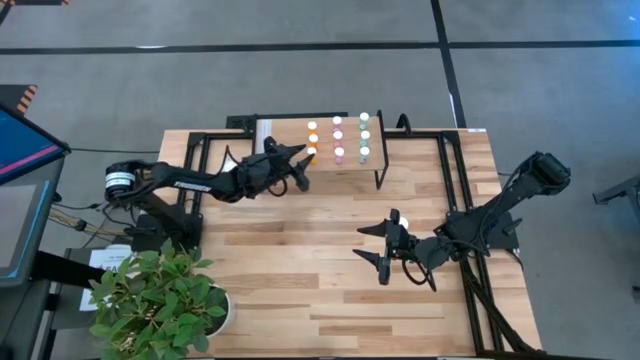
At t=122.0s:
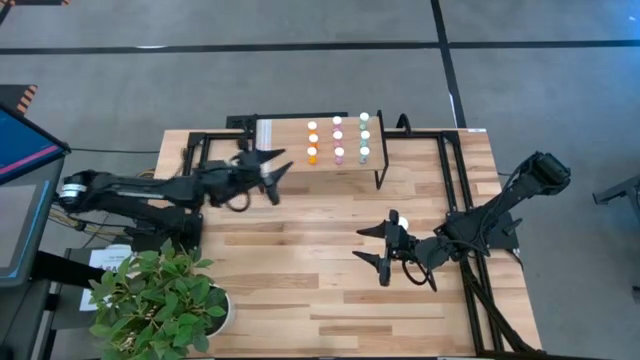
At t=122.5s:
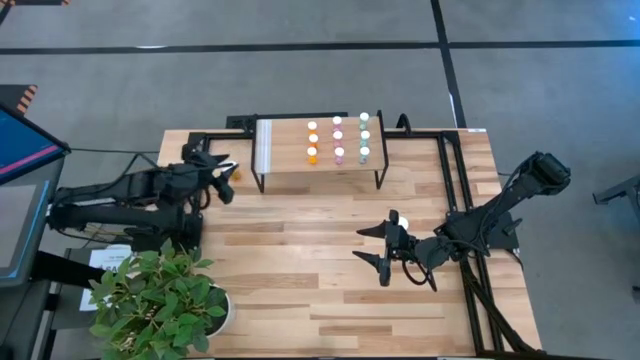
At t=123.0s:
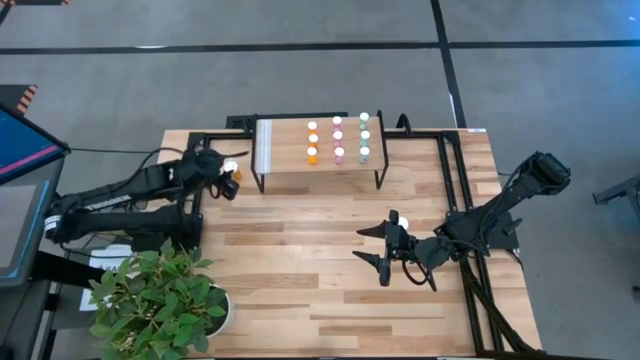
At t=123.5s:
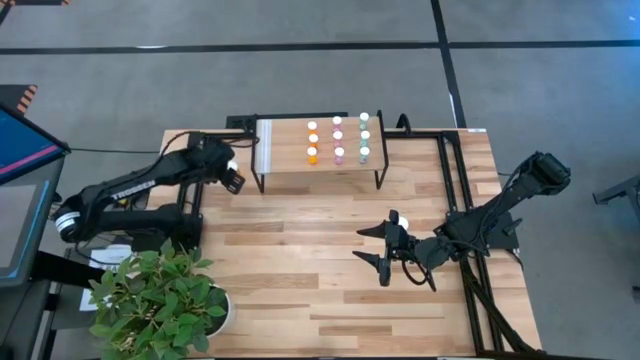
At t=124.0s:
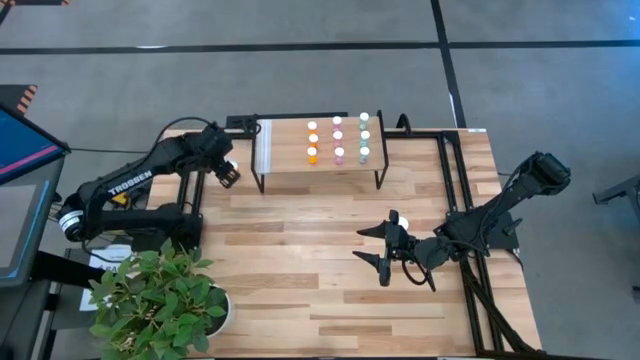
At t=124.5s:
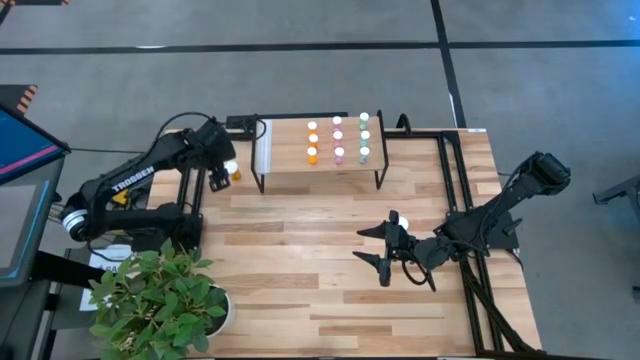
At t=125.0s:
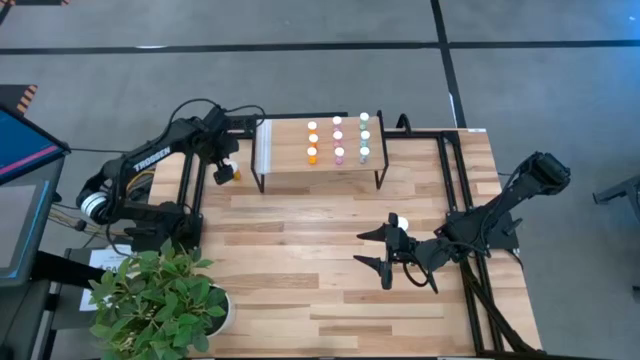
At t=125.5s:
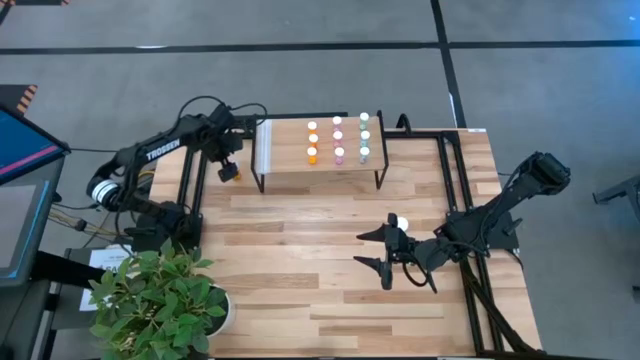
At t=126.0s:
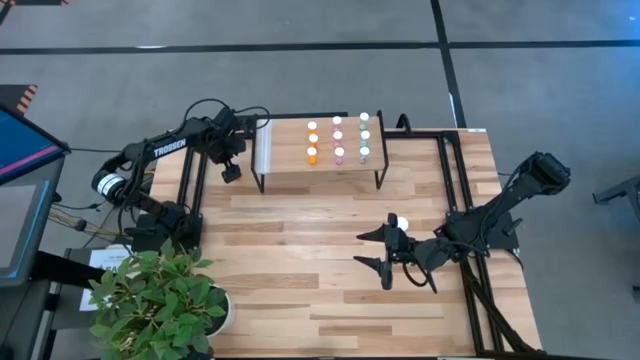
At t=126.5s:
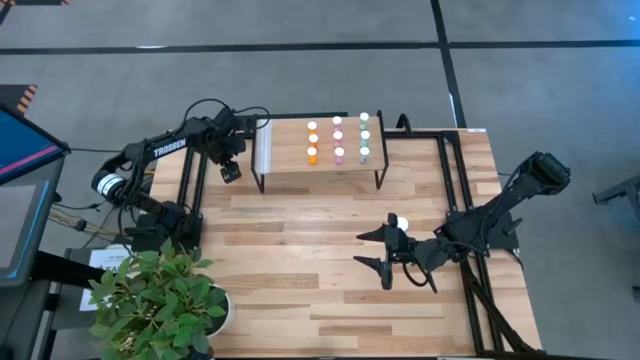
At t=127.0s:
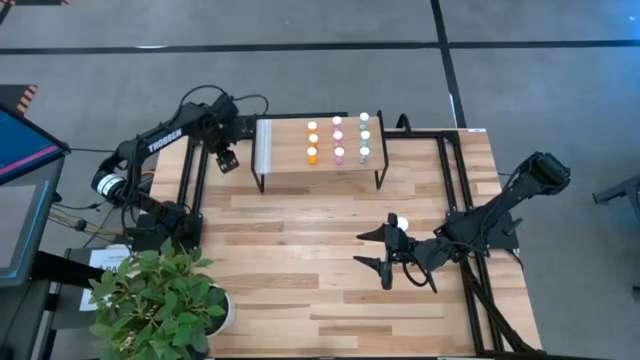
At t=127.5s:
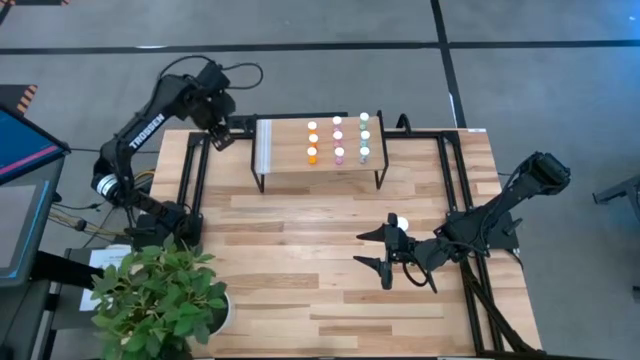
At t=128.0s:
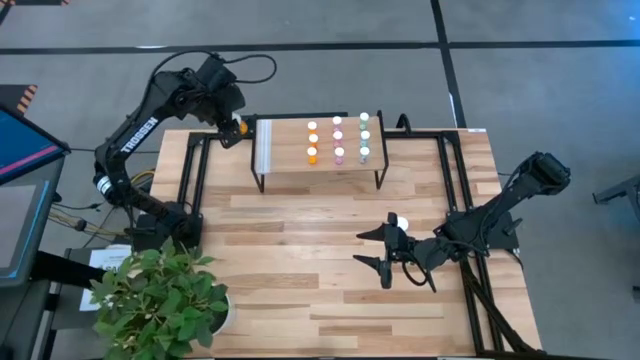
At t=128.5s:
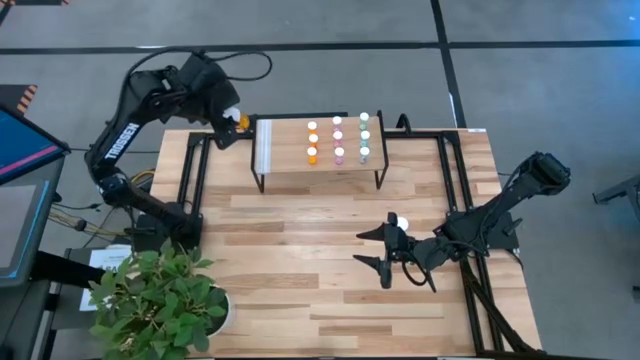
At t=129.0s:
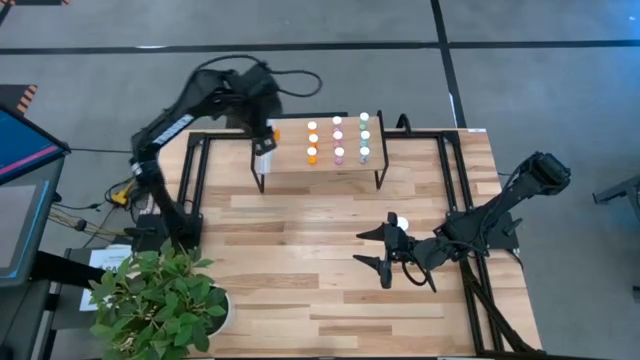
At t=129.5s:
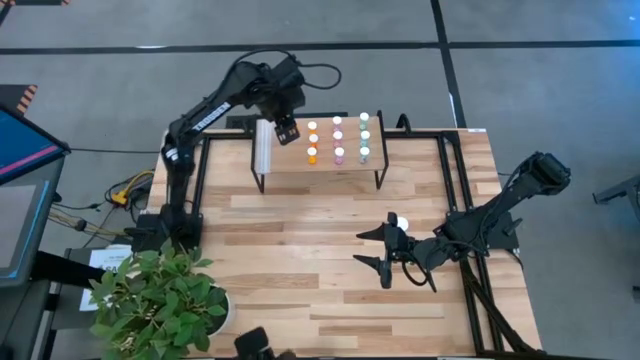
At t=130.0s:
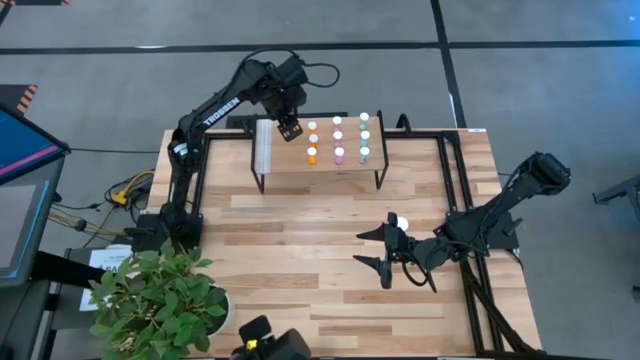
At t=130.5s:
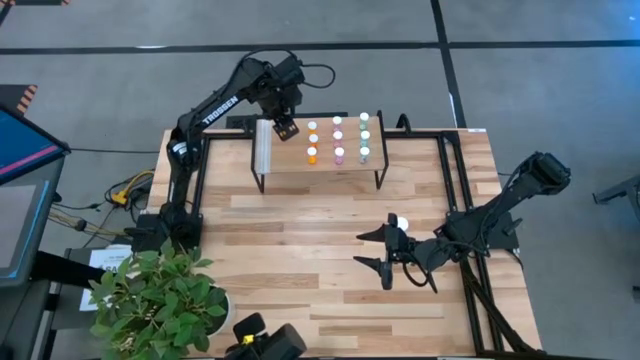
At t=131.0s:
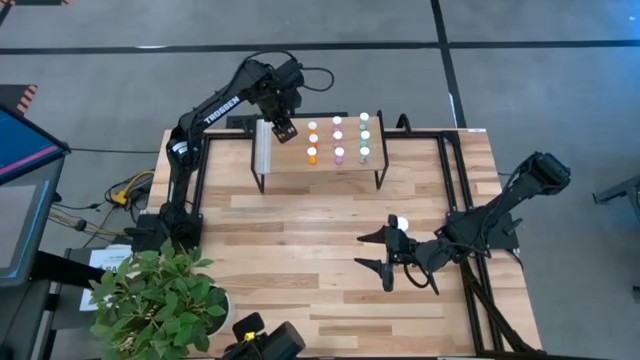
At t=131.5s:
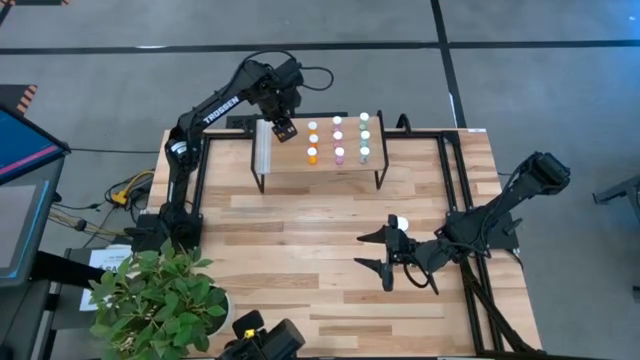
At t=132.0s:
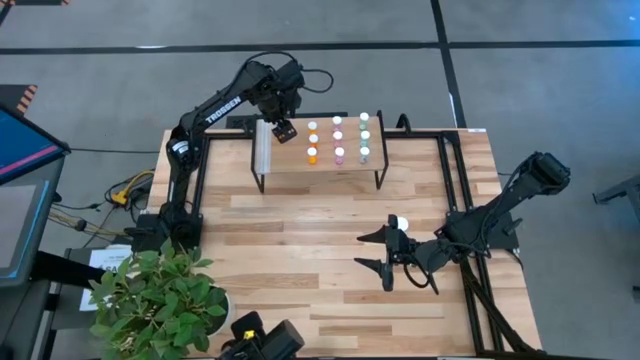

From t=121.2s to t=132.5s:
Task: Pick and place medicine bottles onto shelf by color
Put the top large orange pill bottle on the shelf

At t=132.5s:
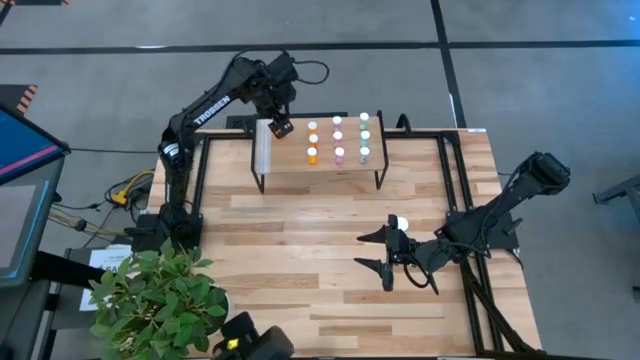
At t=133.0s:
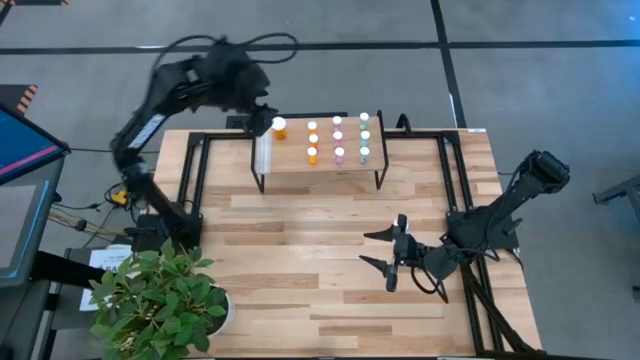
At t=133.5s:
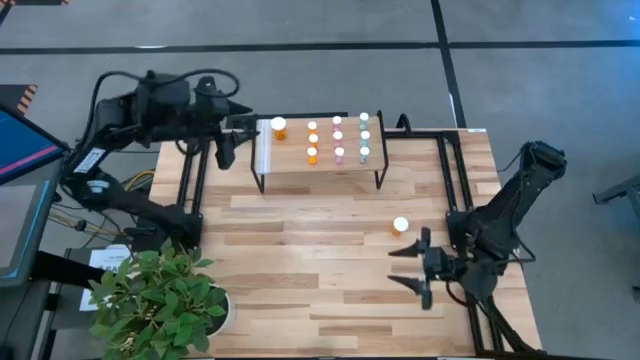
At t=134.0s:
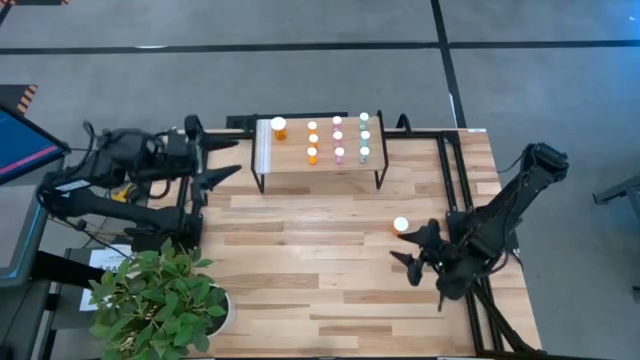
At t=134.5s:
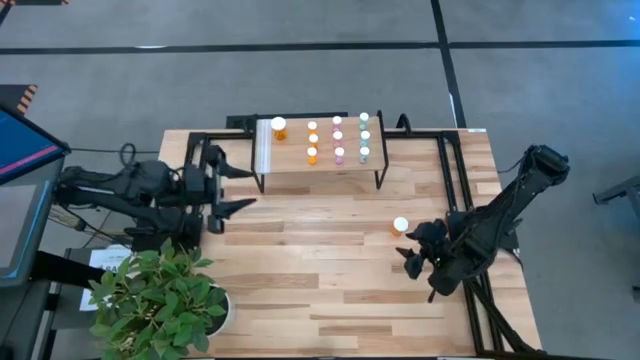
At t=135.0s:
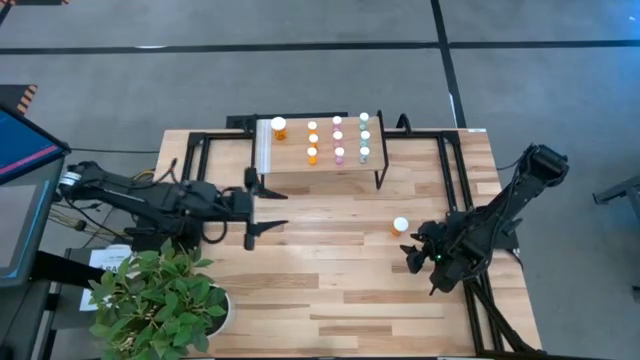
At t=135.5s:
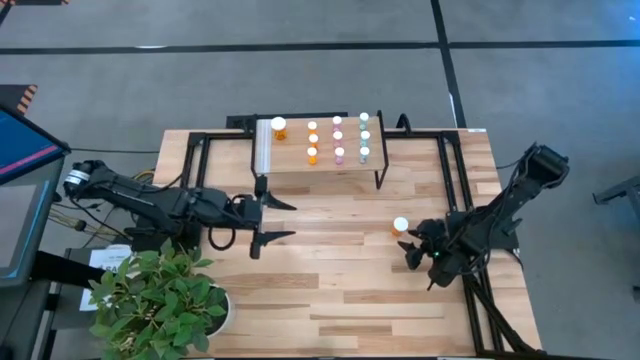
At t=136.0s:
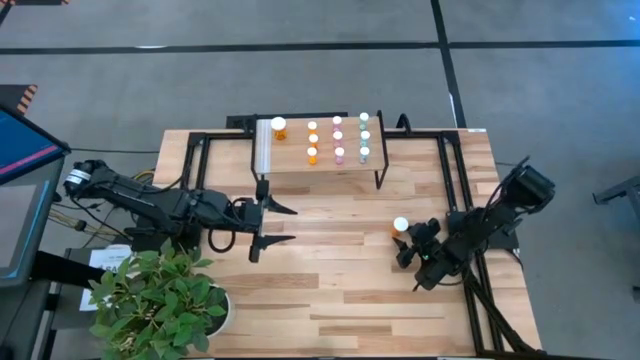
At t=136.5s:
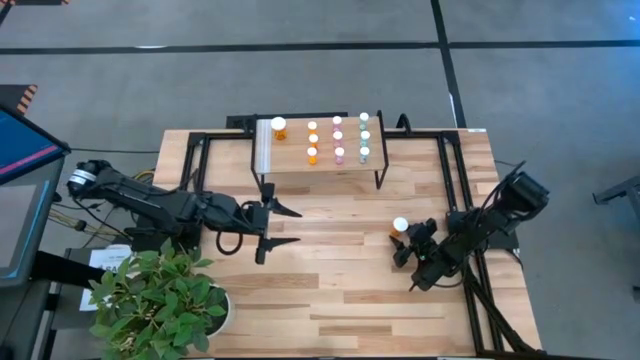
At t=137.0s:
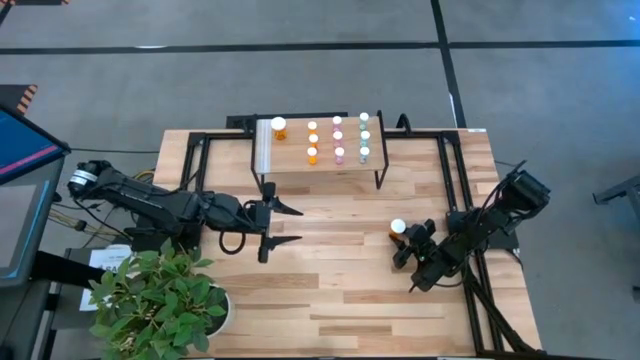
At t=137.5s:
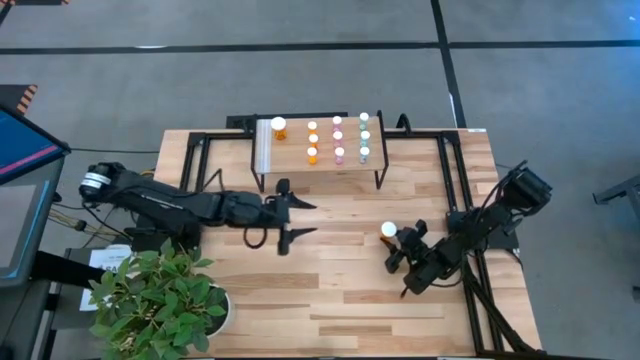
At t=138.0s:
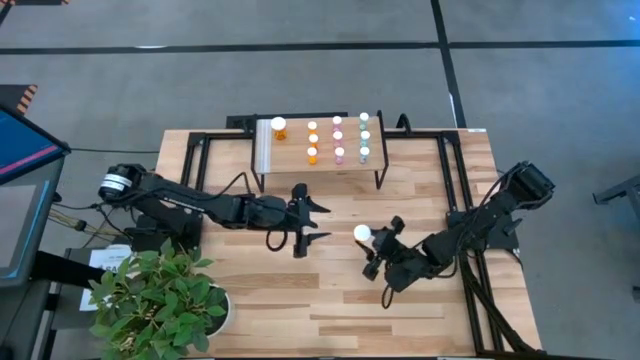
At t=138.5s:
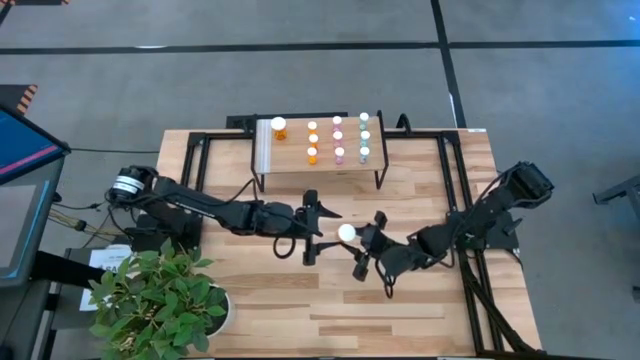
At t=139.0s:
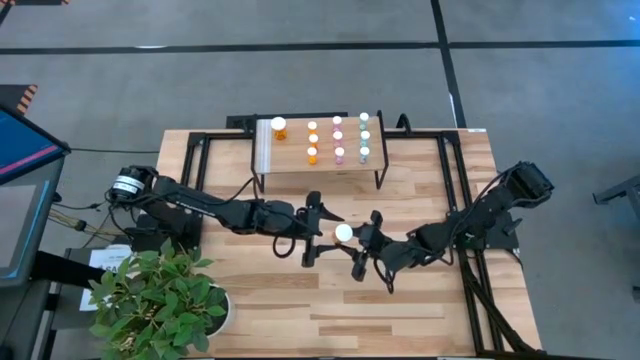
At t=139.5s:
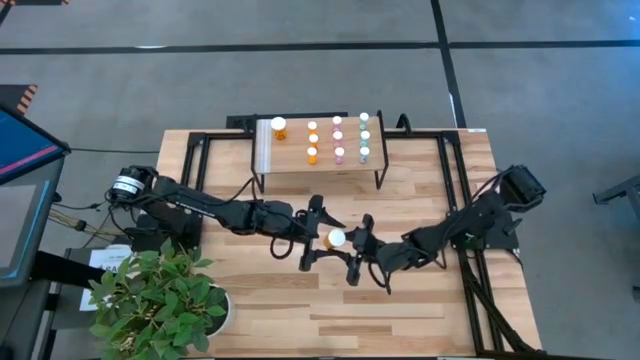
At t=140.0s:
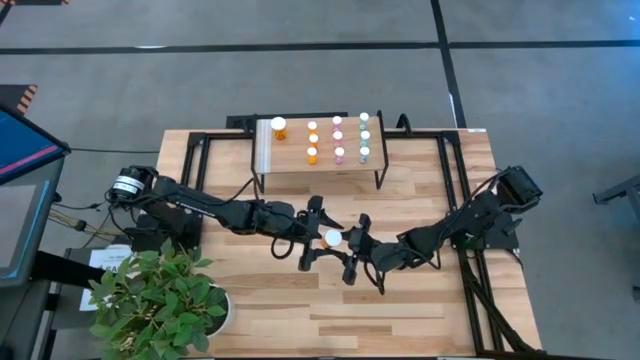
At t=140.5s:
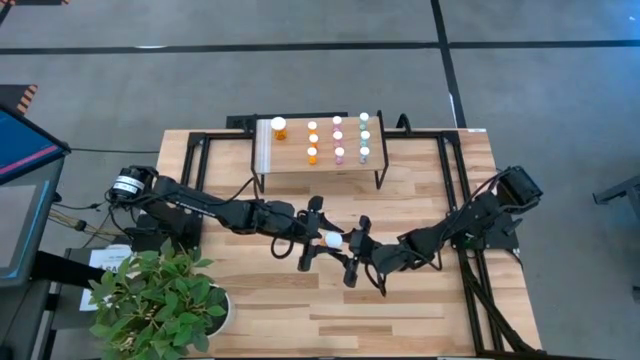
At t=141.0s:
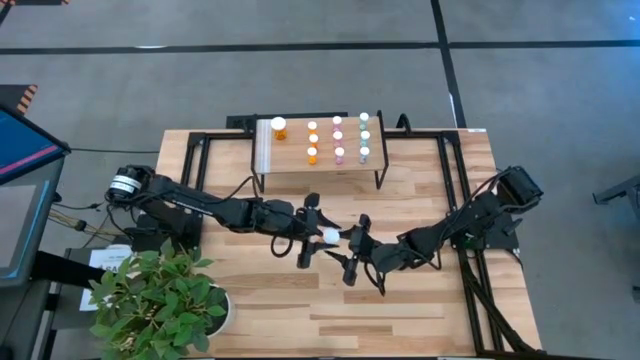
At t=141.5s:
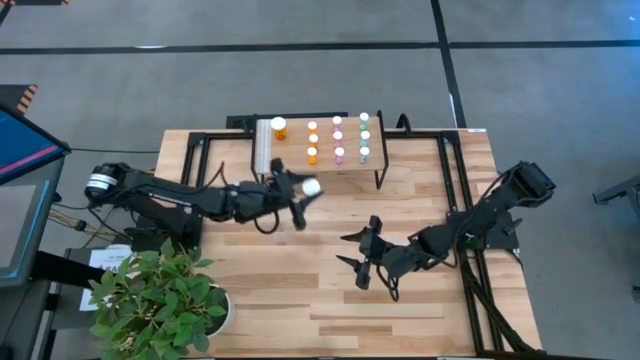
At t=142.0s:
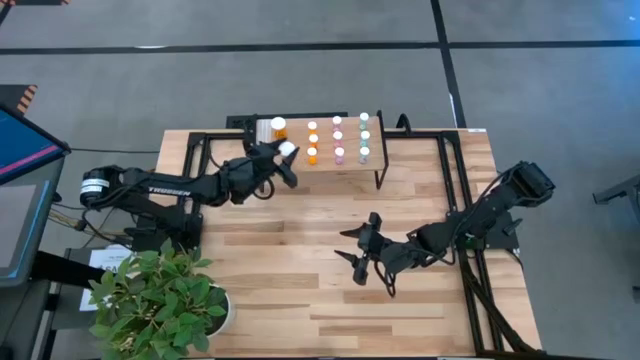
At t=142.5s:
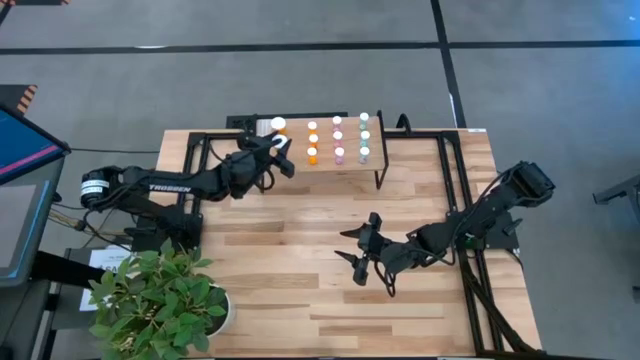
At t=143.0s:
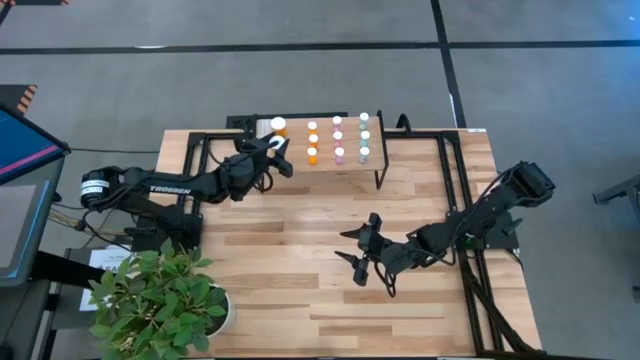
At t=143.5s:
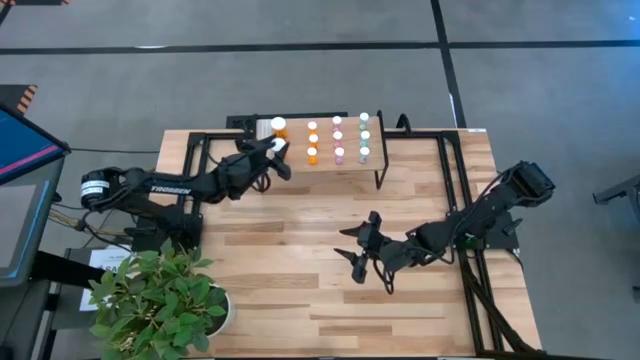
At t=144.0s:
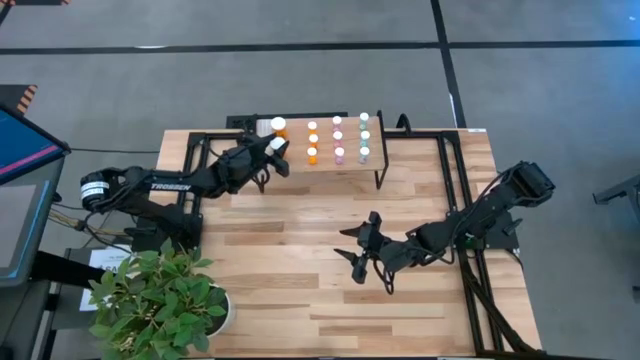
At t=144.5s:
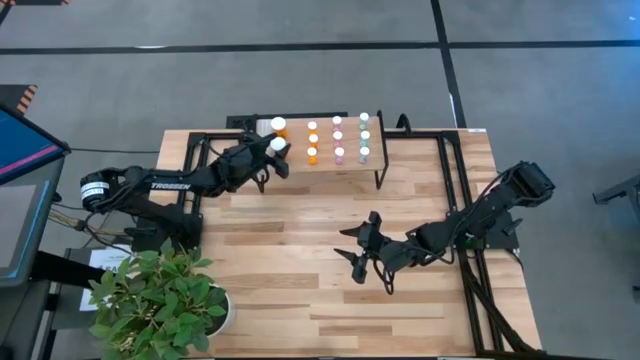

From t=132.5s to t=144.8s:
Align the large orange pill bottle with the other large orange pill bottle on the shelf
